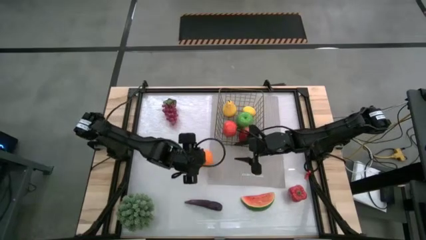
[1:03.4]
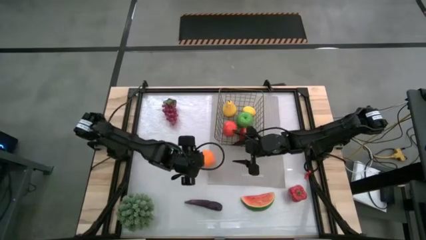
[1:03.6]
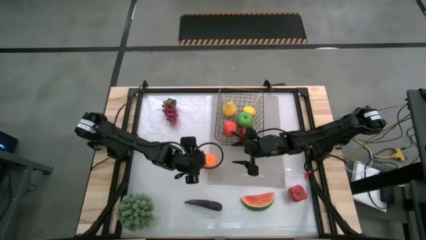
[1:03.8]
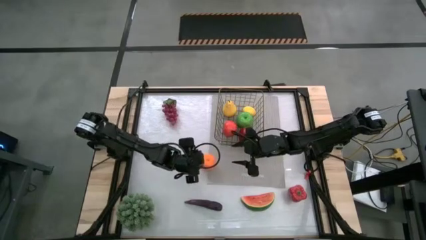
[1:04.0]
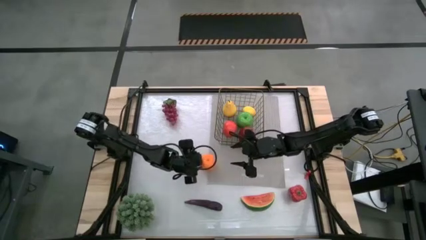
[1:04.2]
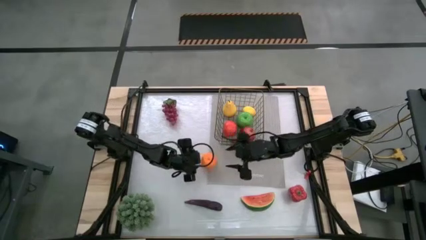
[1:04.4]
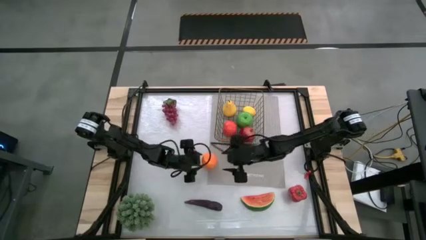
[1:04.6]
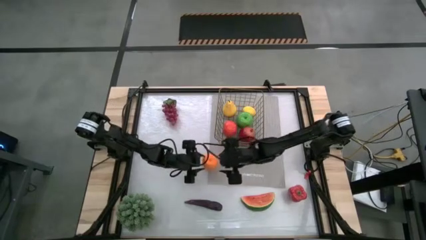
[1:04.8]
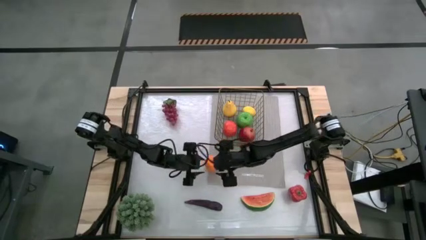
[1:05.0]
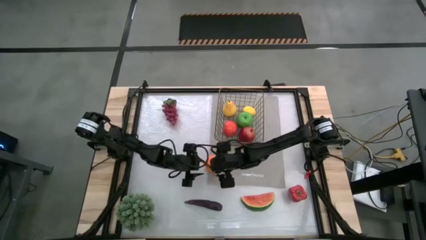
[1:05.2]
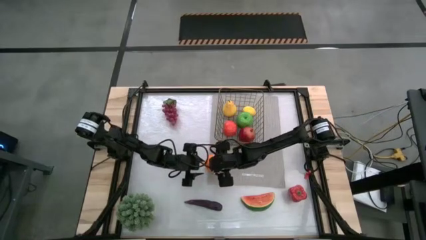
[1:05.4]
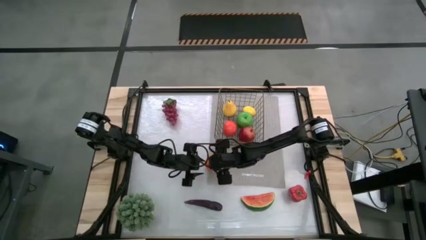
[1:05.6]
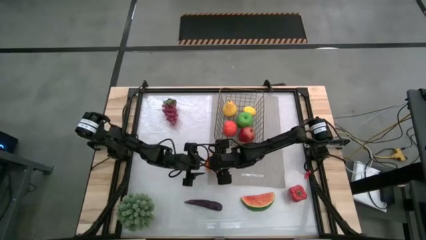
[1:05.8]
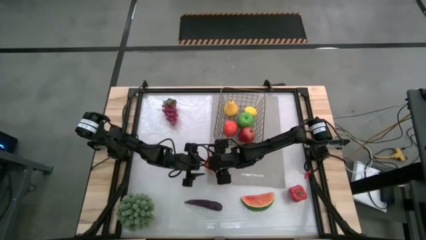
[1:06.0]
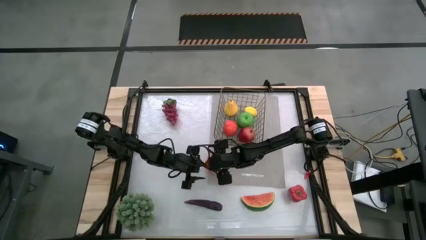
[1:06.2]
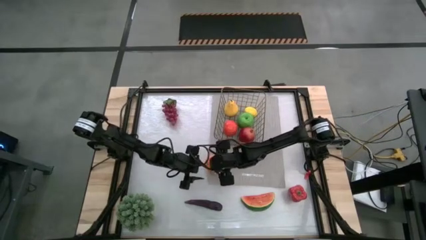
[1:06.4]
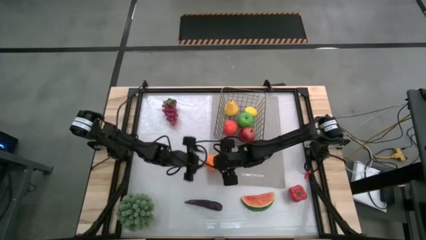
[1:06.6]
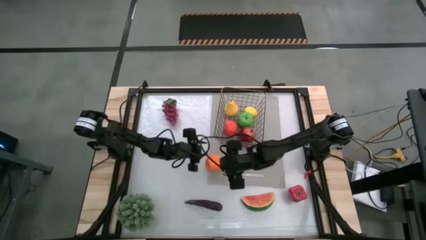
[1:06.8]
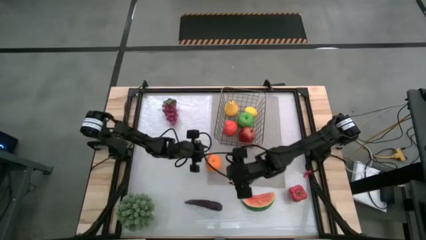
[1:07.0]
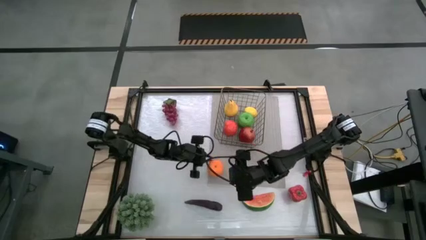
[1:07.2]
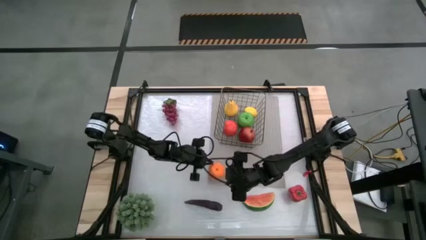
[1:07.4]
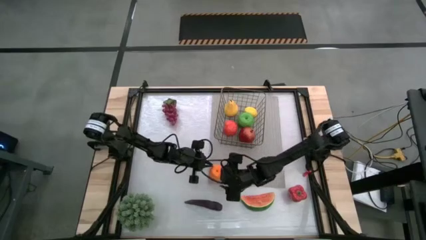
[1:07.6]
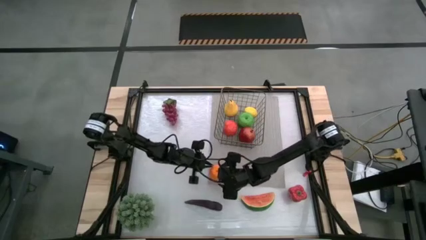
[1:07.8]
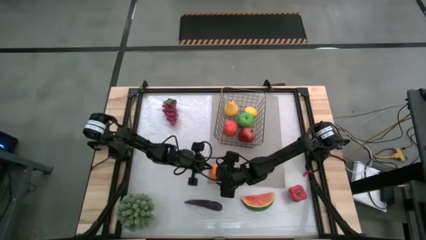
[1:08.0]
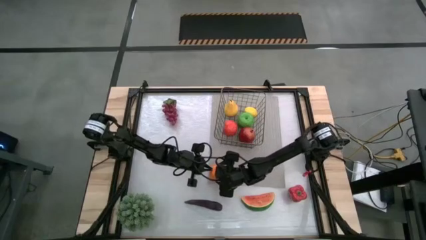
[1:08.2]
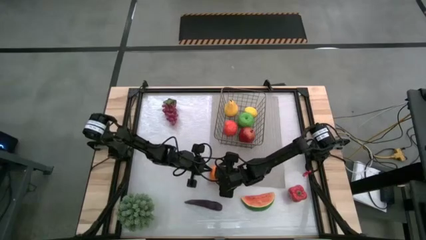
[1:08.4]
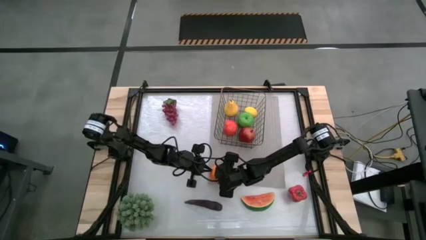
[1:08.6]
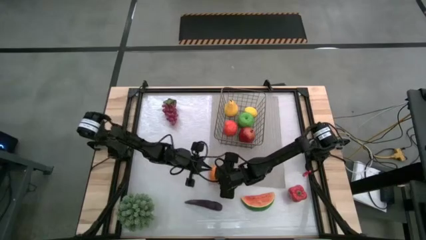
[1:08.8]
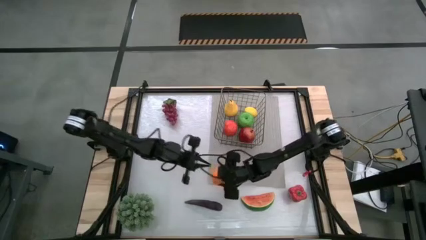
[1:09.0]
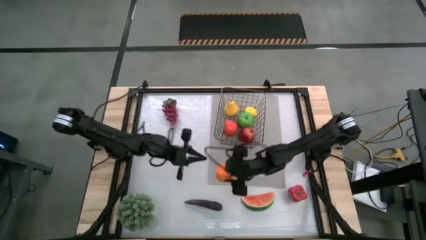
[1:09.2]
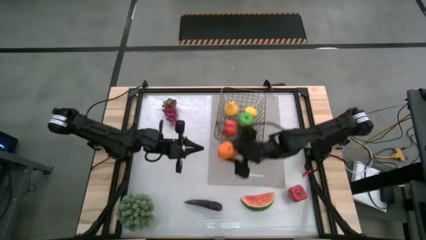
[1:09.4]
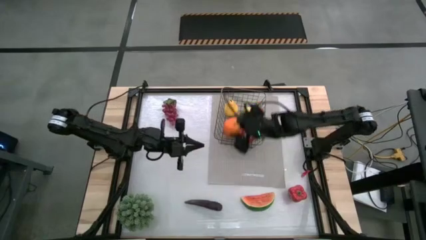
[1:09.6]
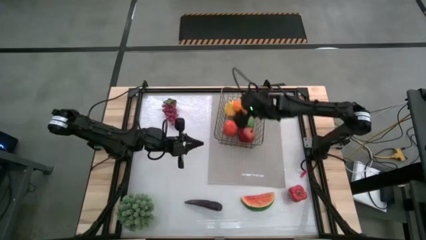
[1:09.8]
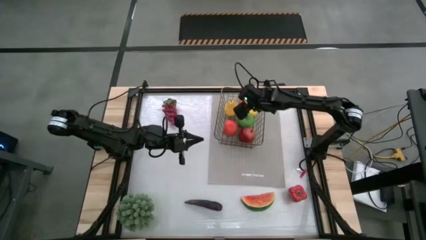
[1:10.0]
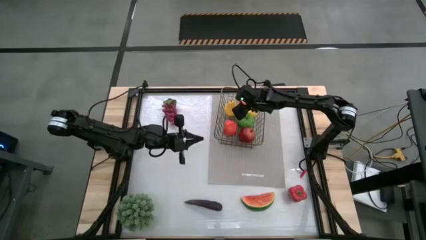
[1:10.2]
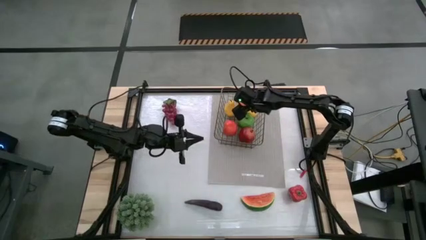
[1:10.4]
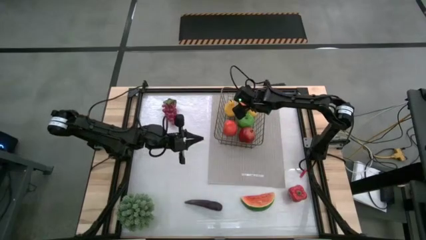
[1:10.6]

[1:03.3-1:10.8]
Task: Build produce basket
Put the orange into the wire basket

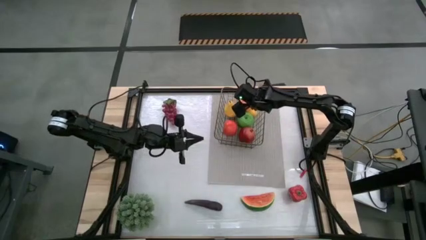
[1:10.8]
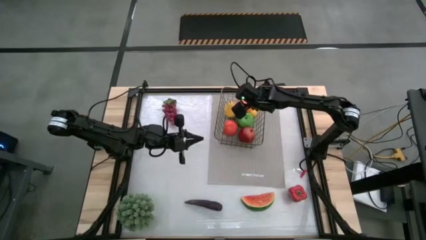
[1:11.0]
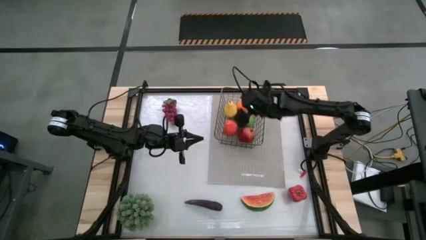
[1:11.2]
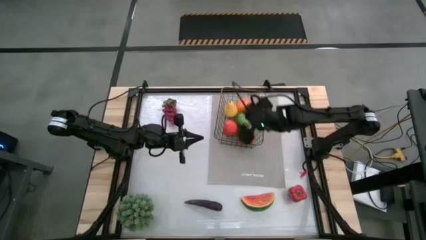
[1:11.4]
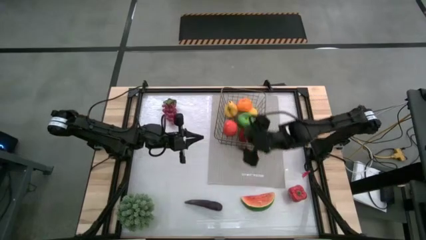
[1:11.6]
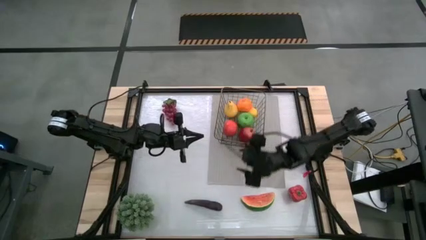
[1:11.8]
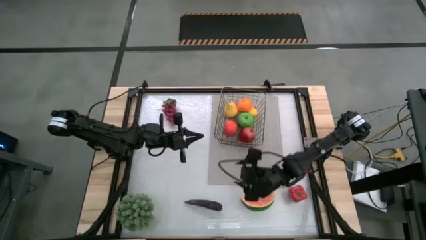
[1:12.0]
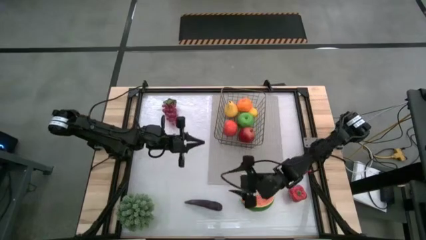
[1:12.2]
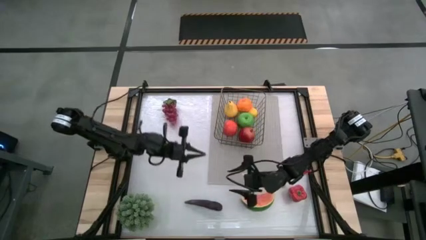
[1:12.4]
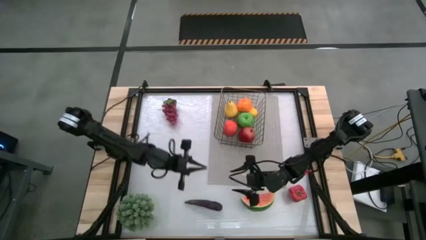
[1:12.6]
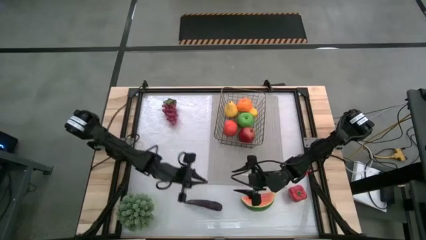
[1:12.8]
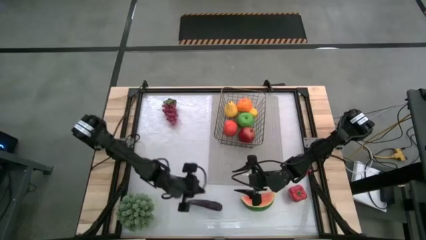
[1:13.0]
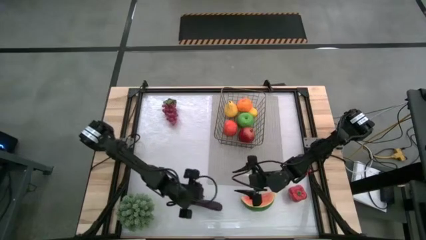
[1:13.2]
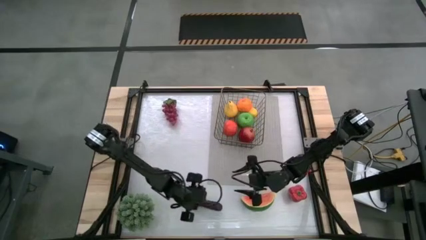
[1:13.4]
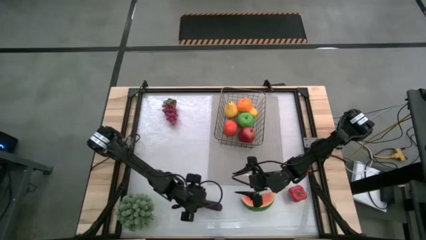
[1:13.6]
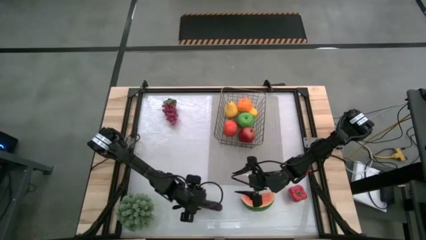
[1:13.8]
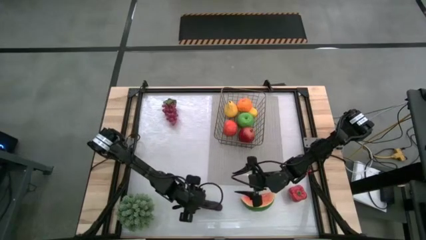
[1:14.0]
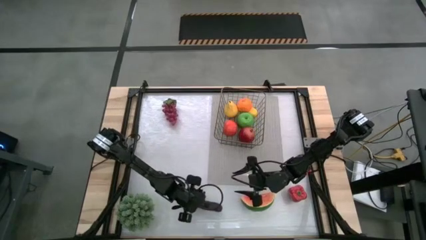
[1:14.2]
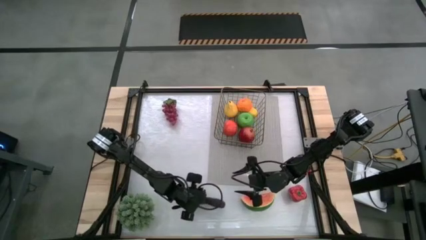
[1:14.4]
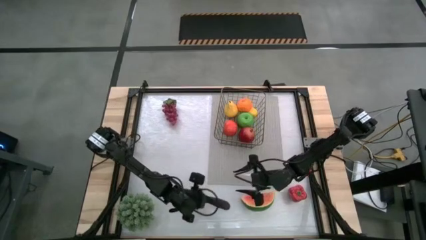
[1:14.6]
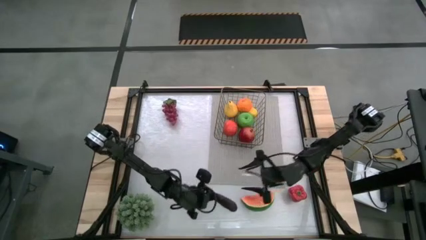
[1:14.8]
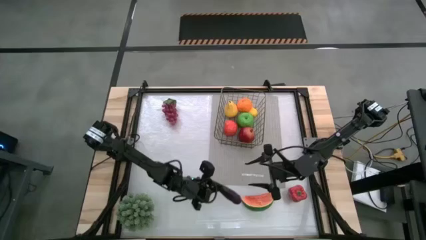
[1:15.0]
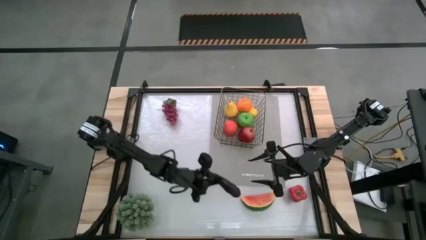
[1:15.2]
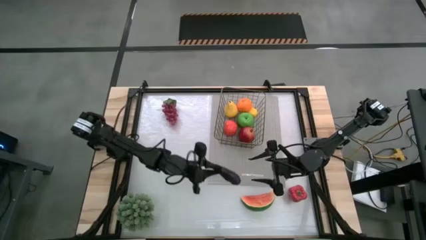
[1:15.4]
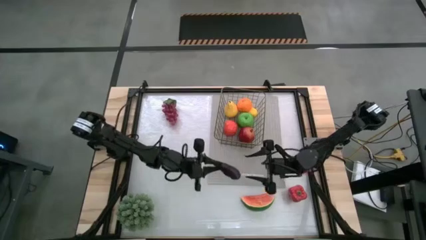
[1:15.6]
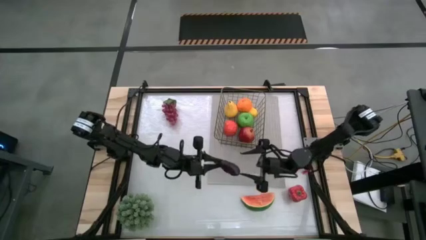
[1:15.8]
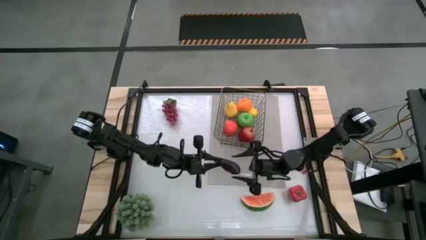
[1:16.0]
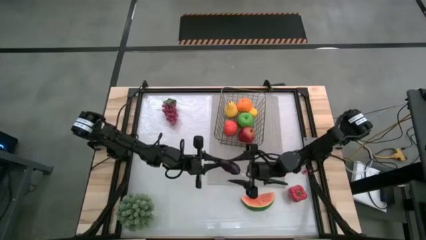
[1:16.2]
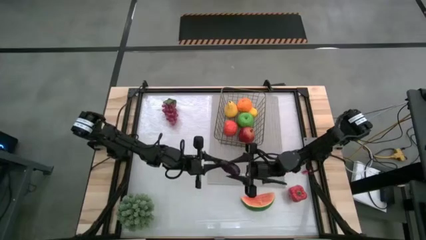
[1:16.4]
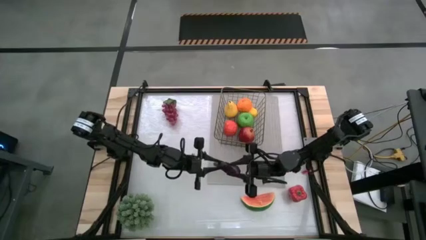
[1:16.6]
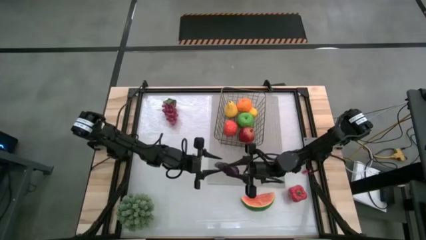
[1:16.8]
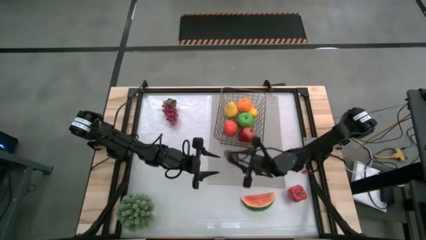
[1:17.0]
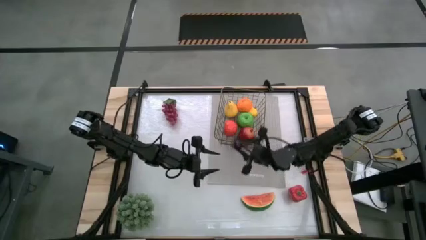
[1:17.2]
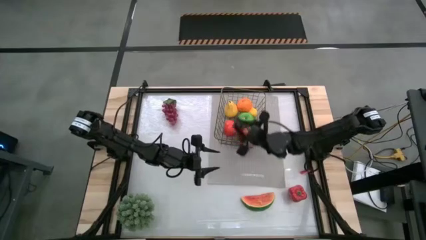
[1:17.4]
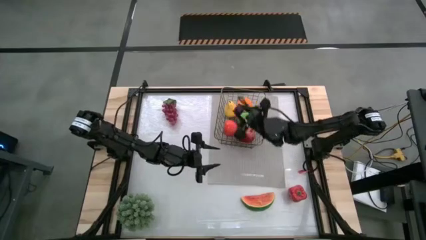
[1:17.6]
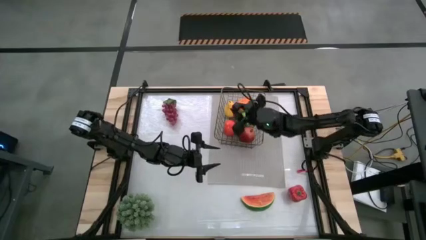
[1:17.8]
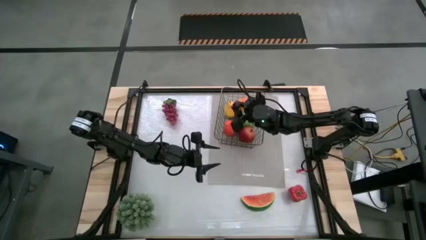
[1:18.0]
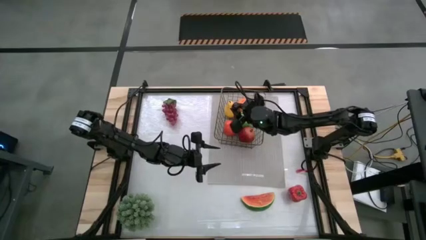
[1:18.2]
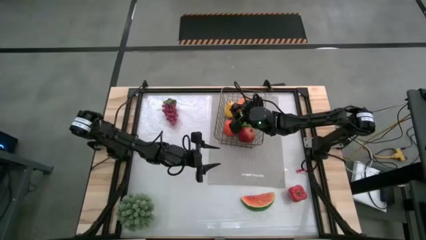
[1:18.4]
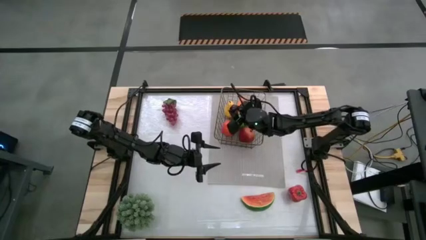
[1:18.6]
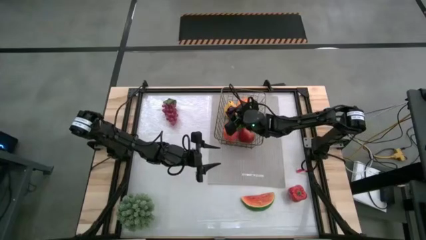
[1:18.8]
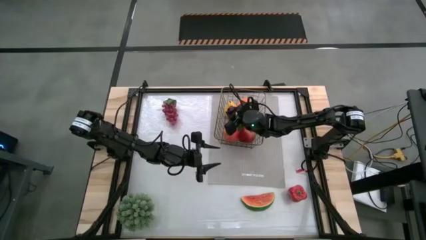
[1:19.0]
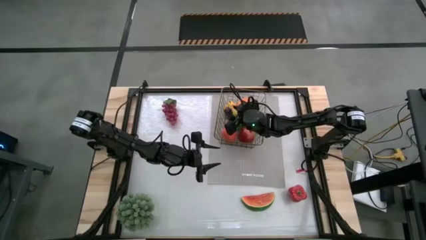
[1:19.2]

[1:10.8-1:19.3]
Put the eggplant into the wire basket
